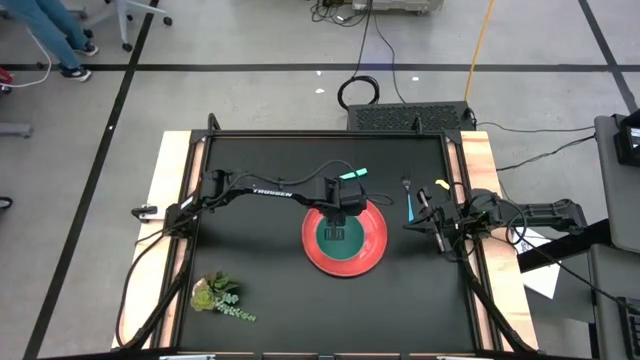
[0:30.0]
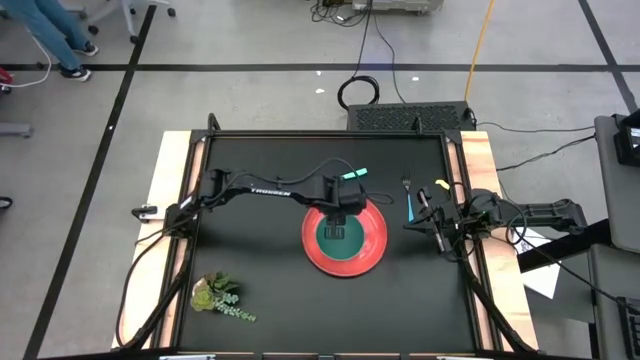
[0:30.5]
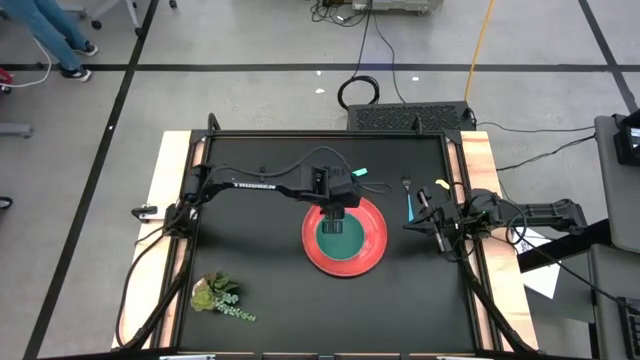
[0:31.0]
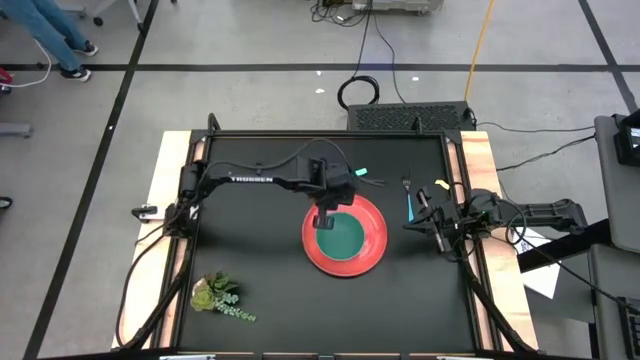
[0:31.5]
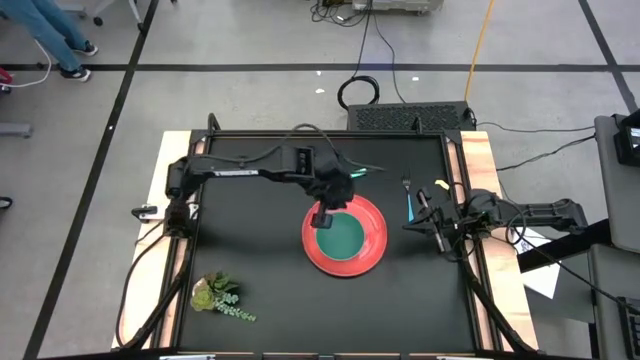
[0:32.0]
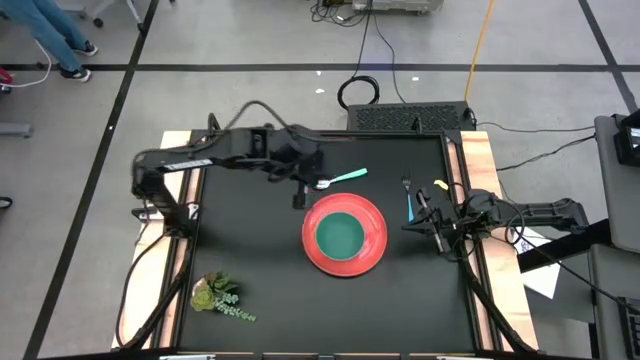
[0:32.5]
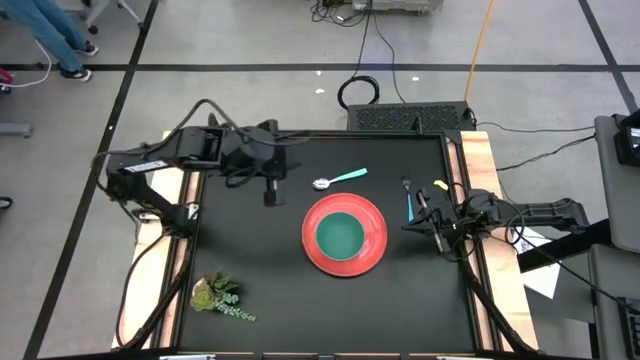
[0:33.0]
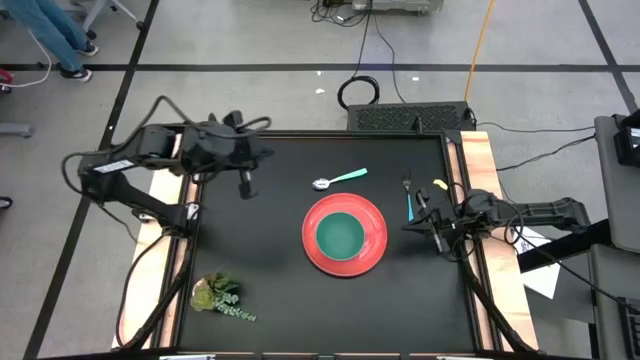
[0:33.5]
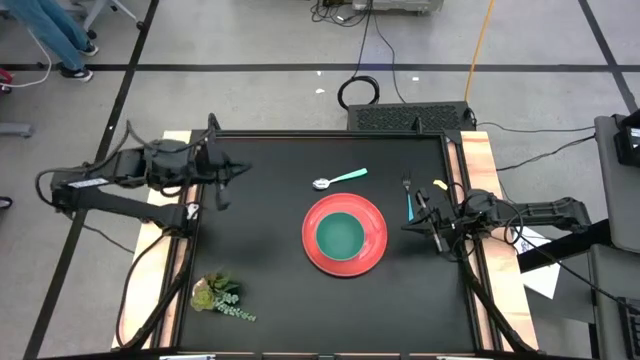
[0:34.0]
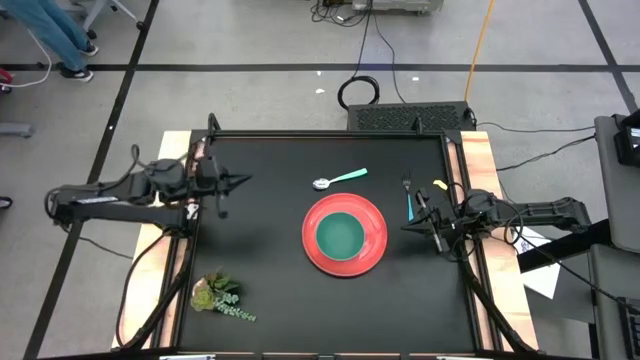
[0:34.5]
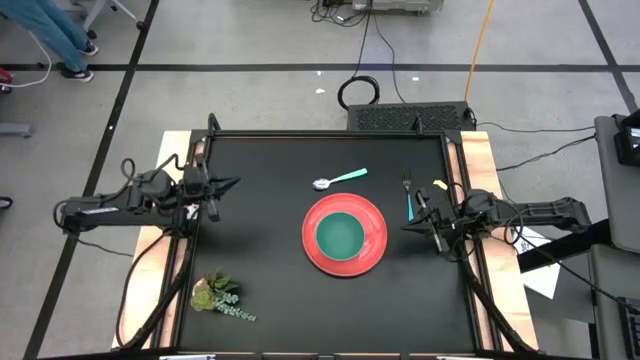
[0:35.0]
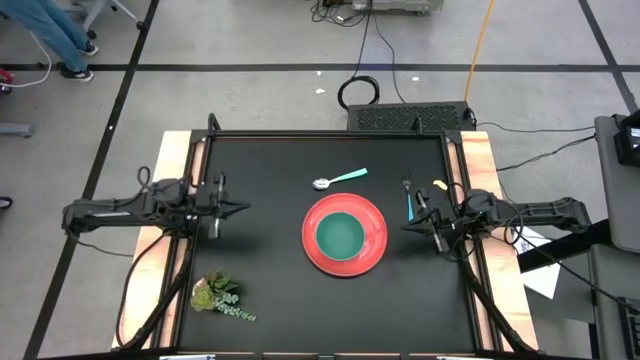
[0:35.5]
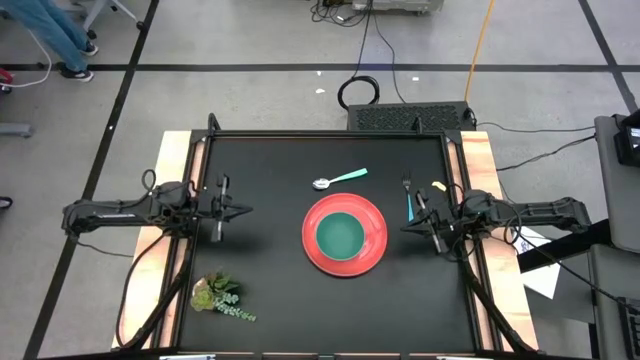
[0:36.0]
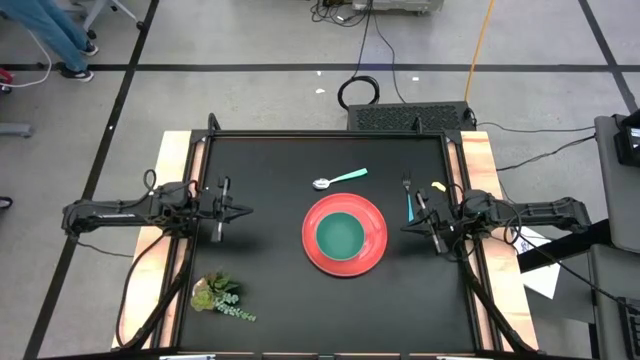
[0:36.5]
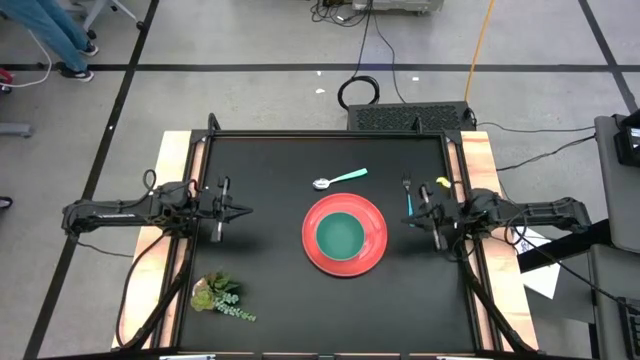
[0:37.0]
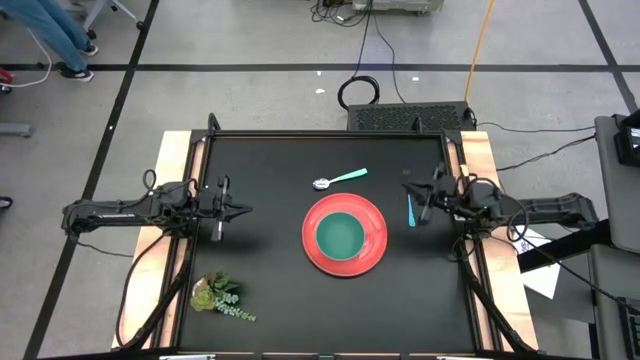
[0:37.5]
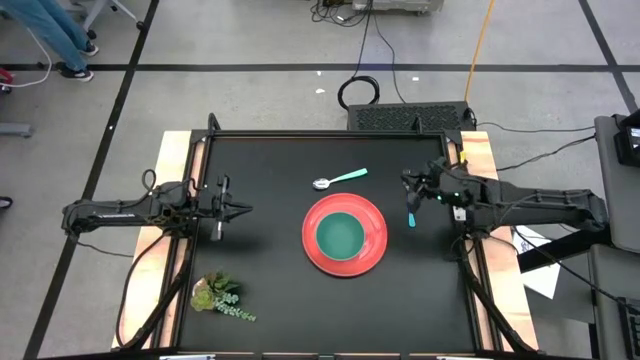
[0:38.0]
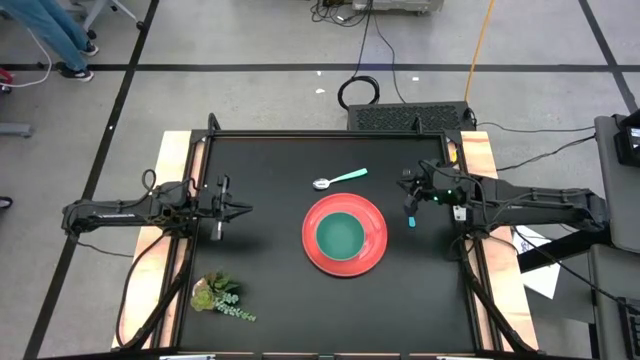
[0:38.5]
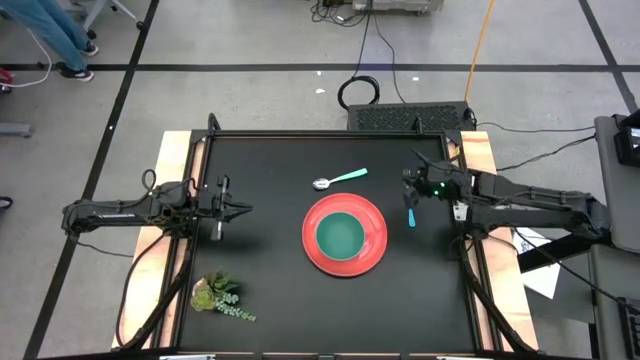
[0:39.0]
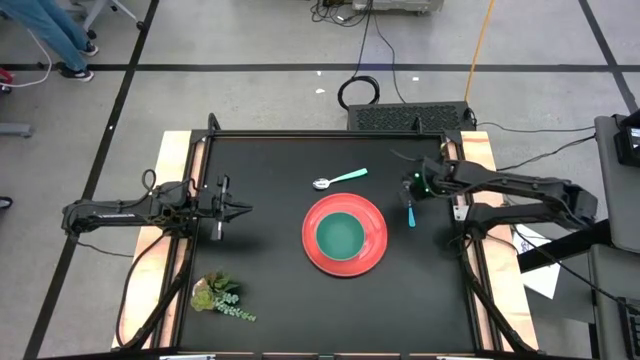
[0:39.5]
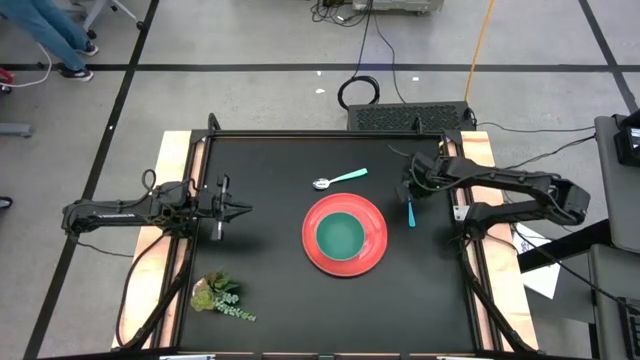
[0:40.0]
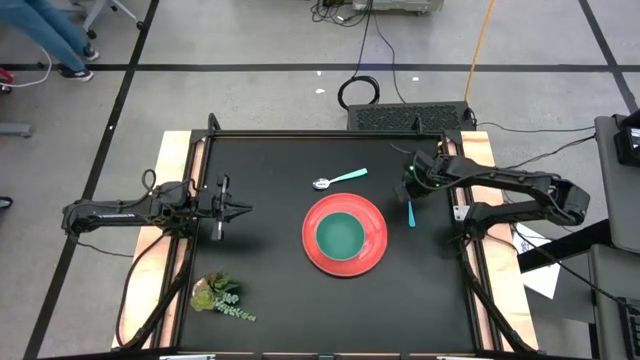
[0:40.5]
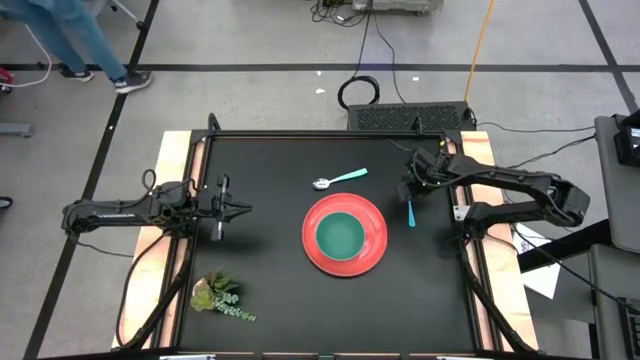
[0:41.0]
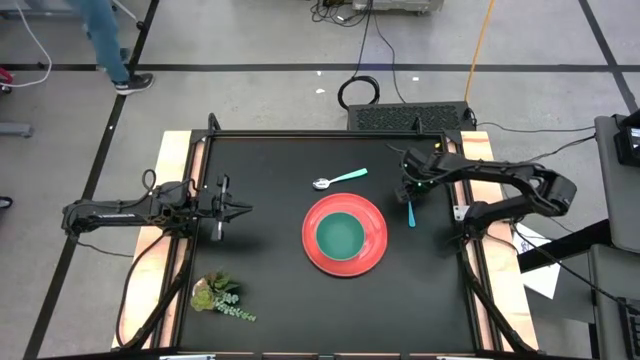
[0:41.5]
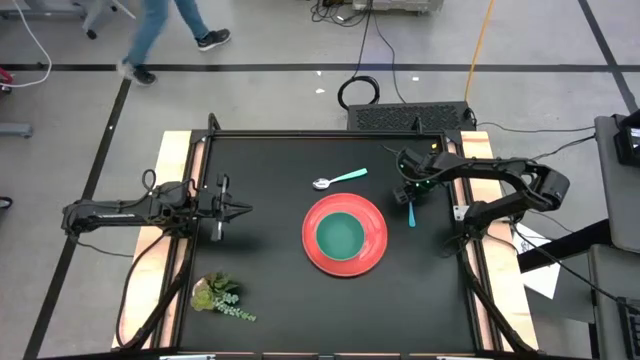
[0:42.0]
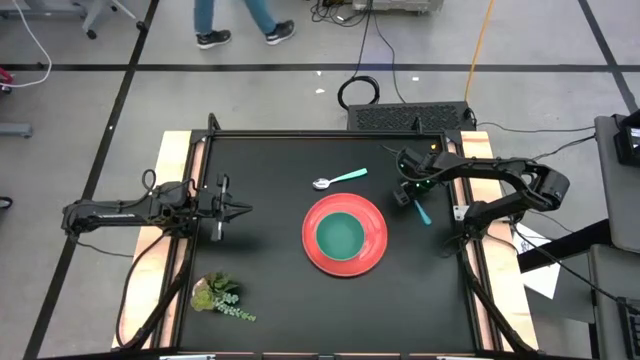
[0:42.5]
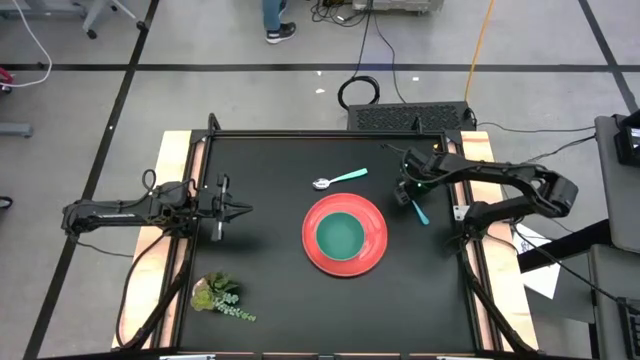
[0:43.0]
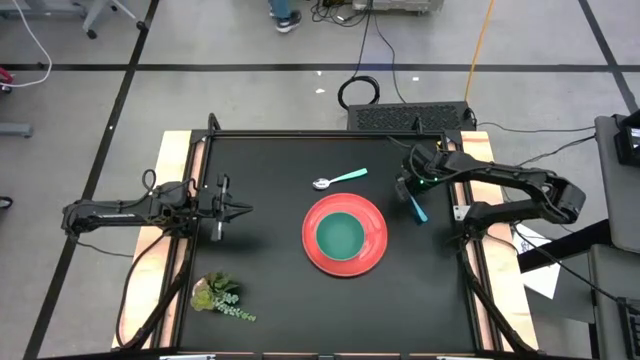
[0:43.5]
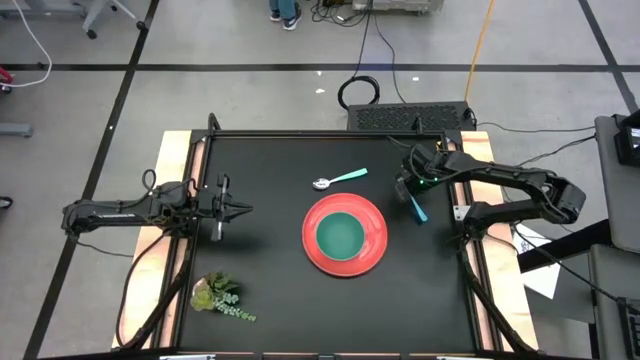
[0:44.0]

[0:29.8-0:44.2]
Task: Set table place
Put the blue fork on the orange plate to the right of the green bowl

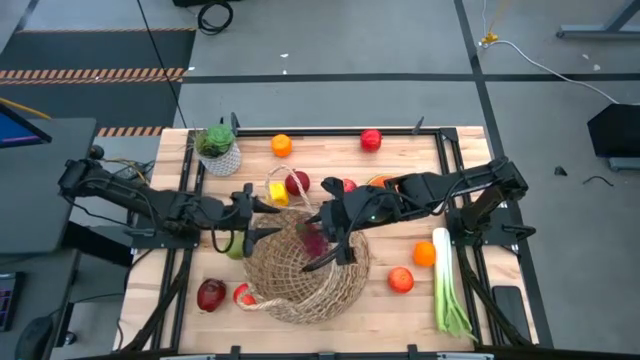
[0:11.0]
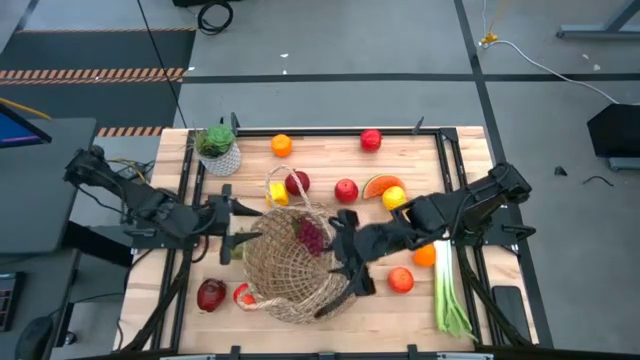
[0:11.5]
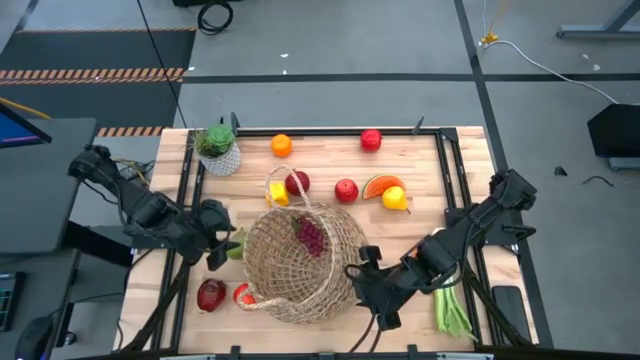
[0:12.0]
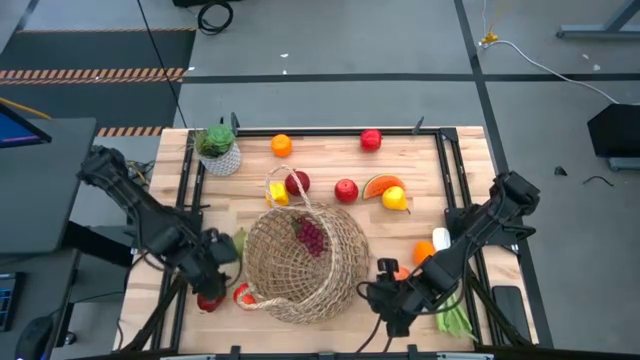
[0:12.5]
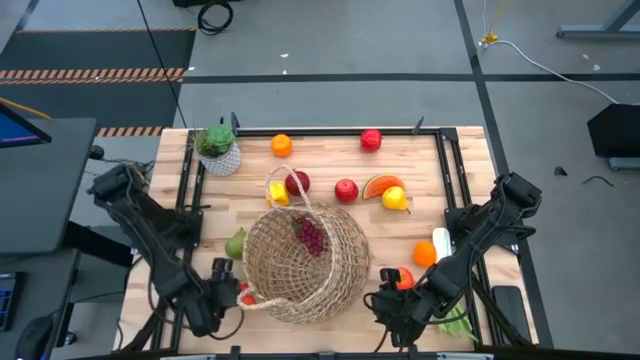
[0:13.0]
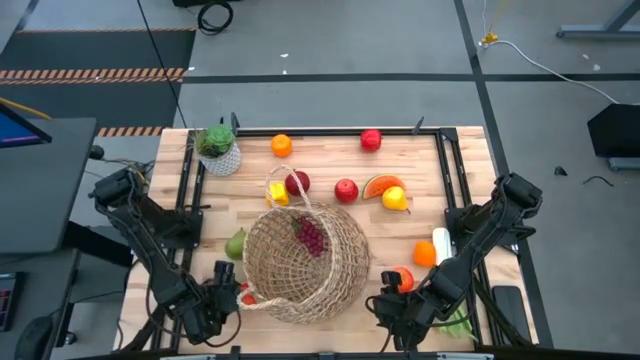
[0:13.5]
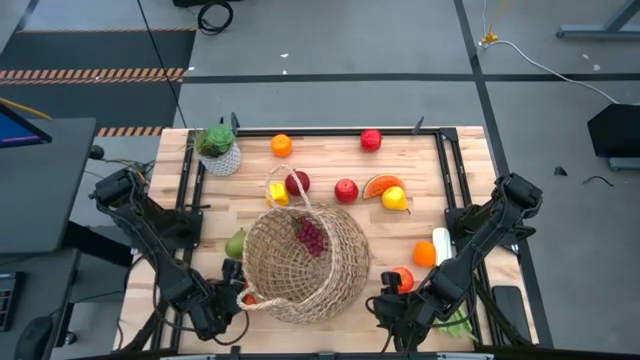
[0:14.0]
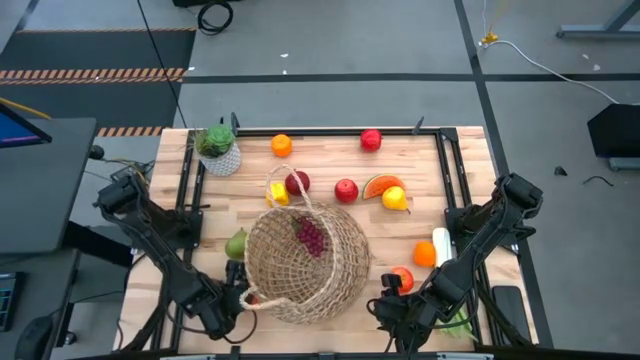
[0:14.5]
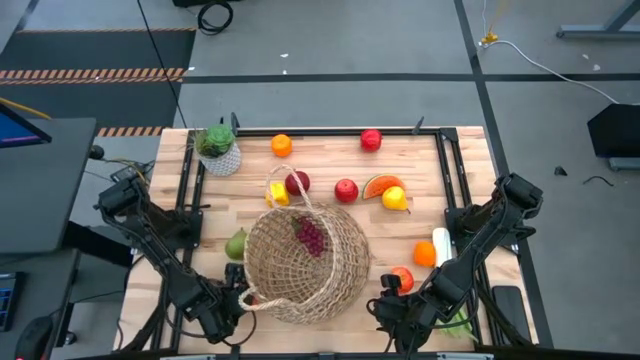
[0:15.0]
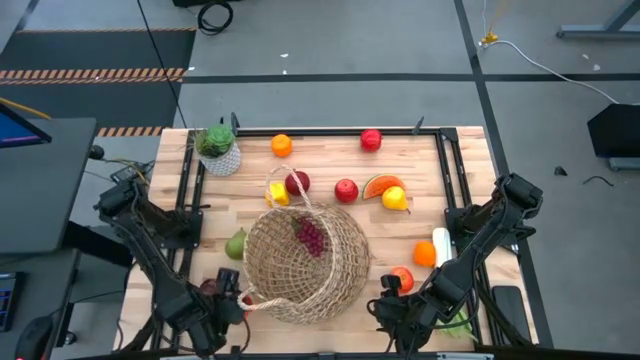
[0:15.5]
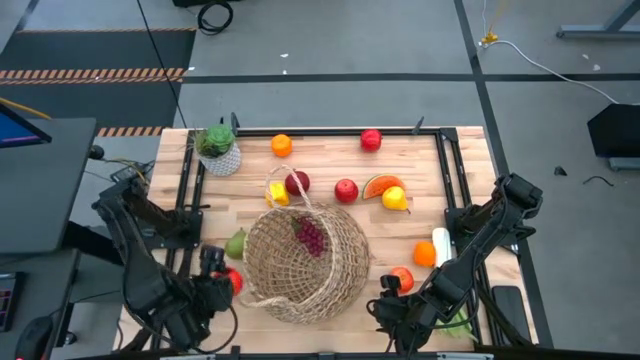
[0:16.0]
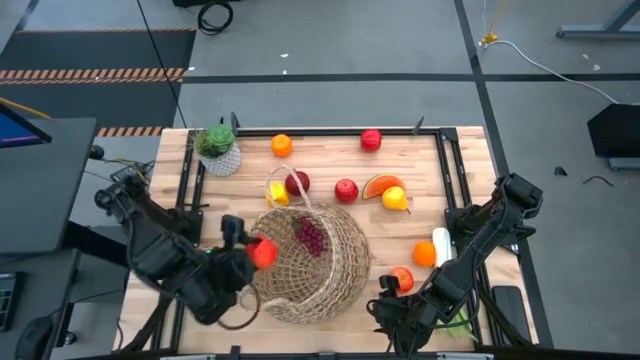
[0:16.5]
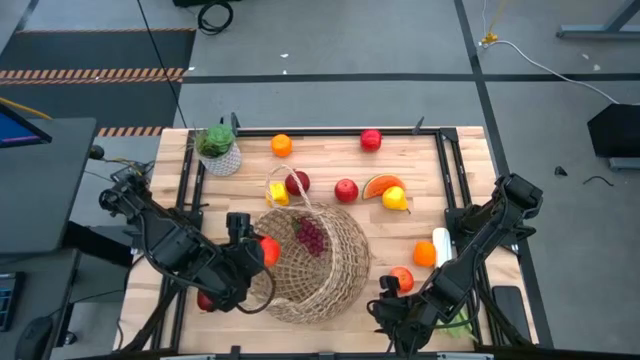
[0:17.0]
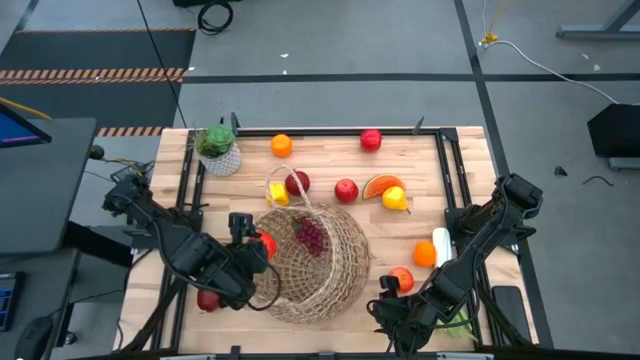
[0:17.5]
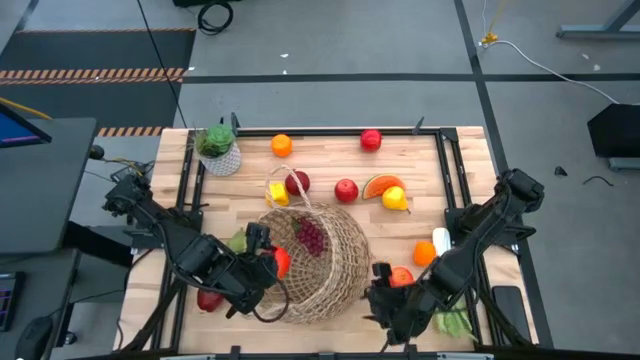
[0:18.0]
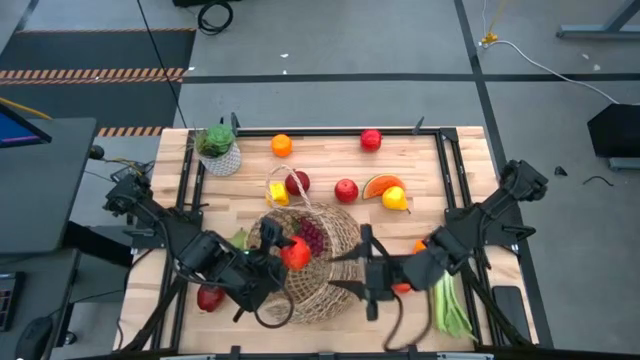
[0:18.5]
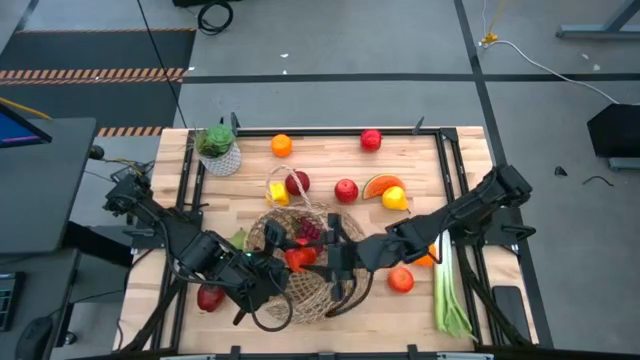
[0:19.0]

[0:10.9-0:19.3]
Task: Build produce basket
Put the apple into the basket
